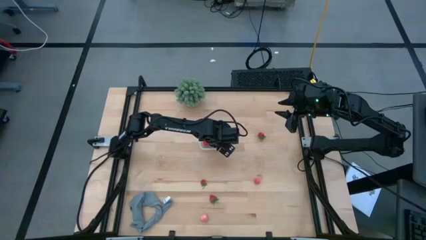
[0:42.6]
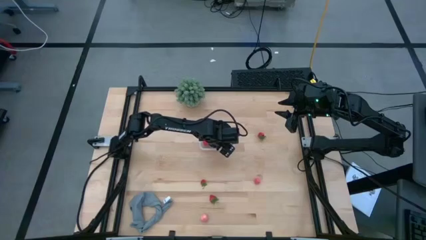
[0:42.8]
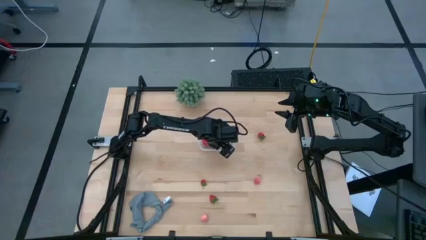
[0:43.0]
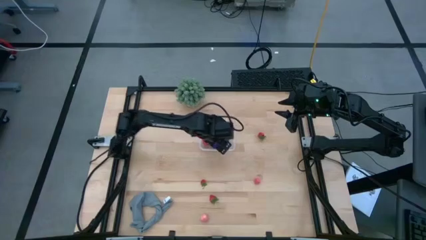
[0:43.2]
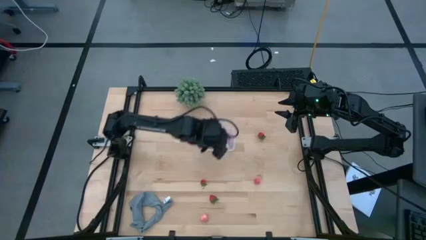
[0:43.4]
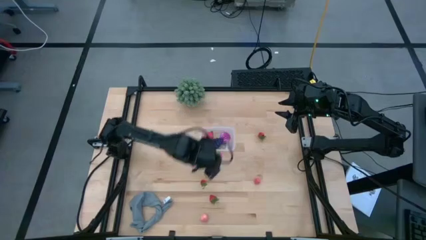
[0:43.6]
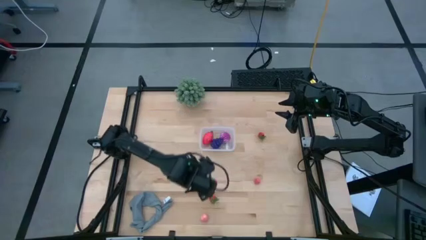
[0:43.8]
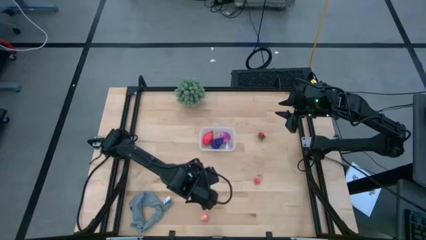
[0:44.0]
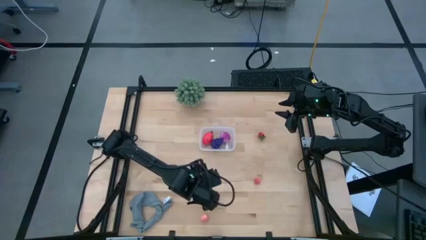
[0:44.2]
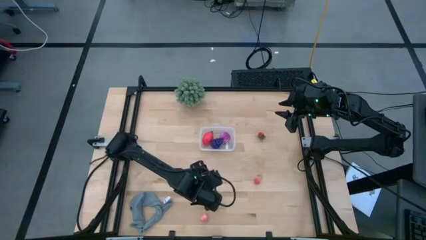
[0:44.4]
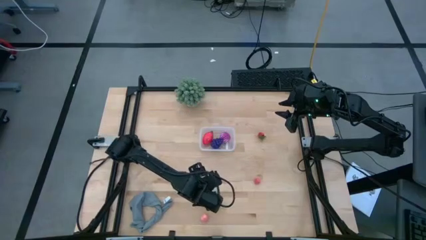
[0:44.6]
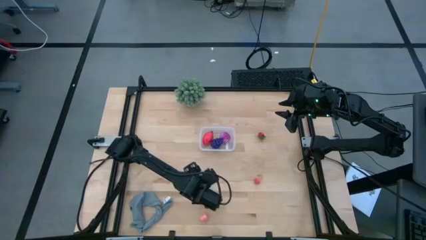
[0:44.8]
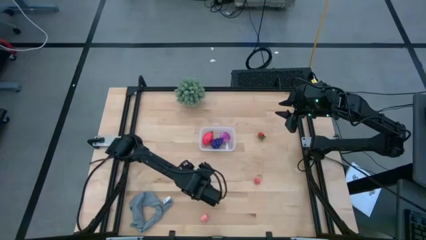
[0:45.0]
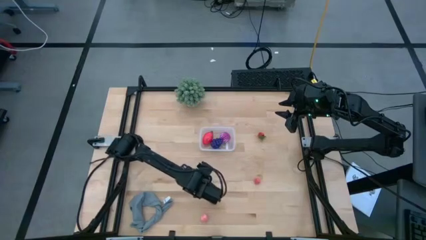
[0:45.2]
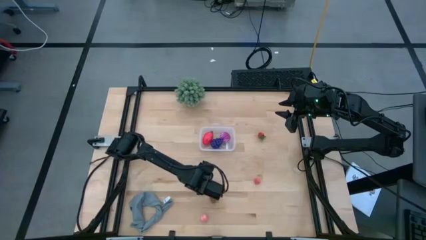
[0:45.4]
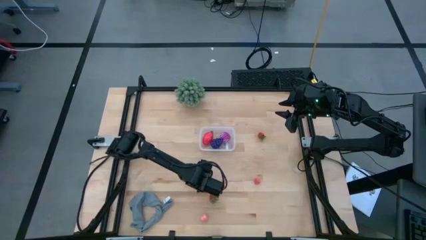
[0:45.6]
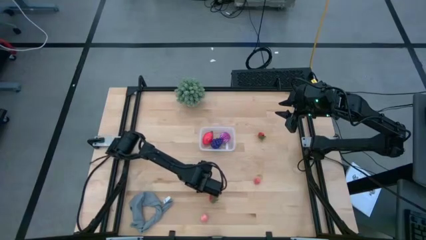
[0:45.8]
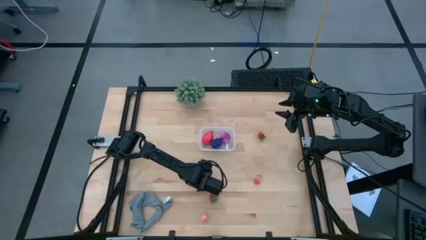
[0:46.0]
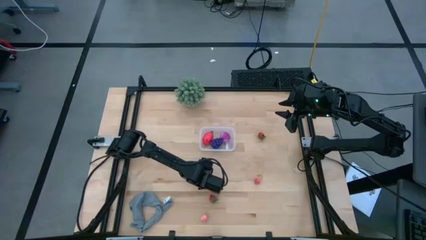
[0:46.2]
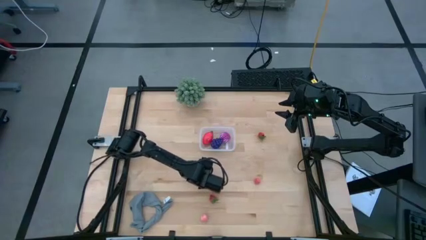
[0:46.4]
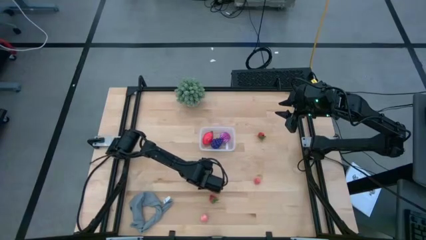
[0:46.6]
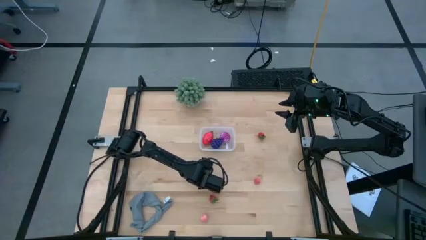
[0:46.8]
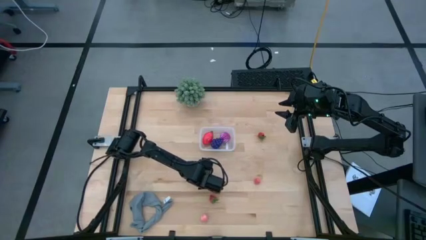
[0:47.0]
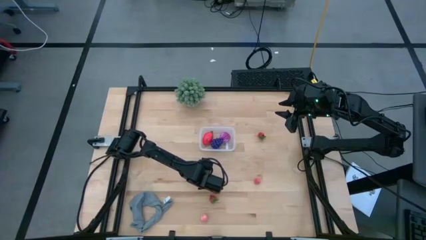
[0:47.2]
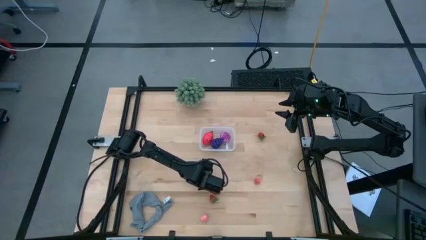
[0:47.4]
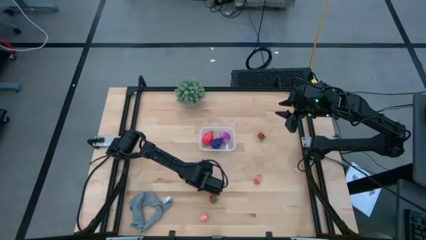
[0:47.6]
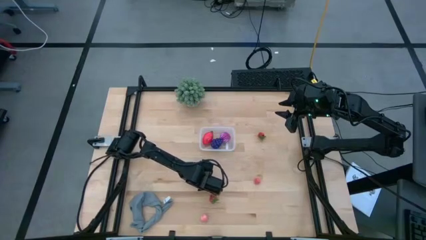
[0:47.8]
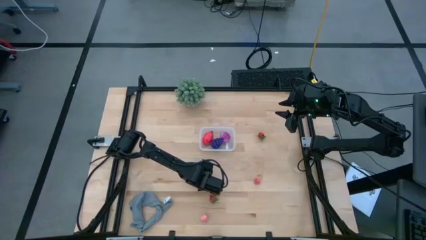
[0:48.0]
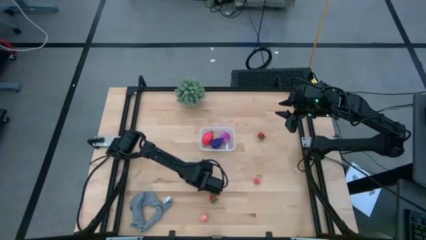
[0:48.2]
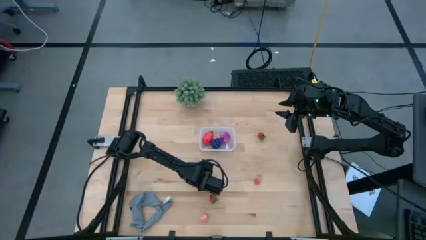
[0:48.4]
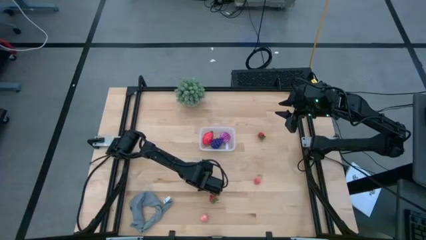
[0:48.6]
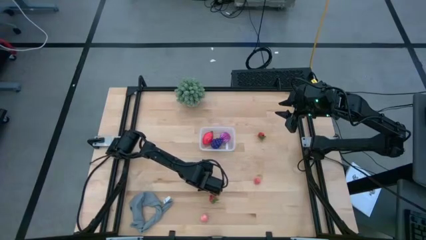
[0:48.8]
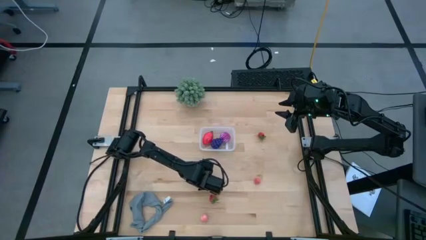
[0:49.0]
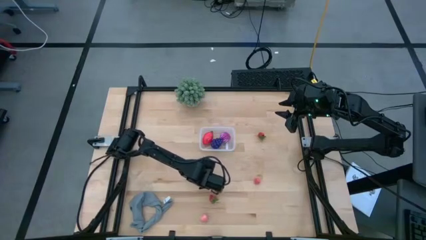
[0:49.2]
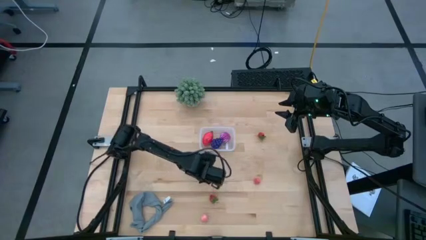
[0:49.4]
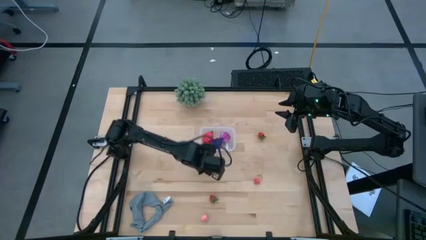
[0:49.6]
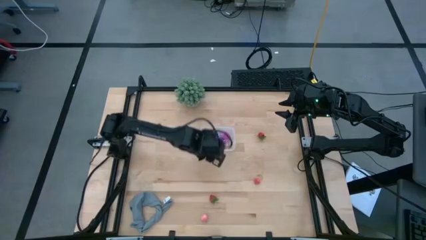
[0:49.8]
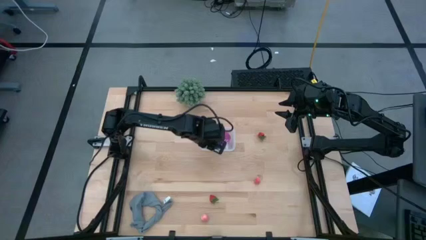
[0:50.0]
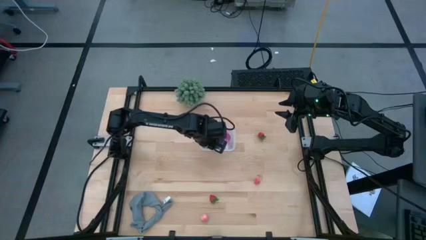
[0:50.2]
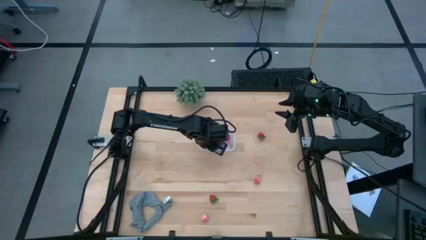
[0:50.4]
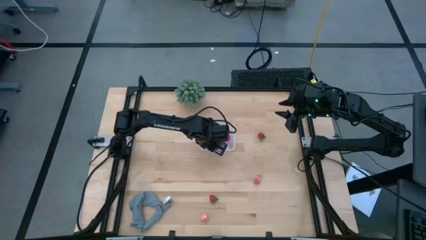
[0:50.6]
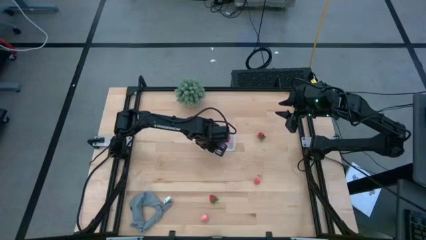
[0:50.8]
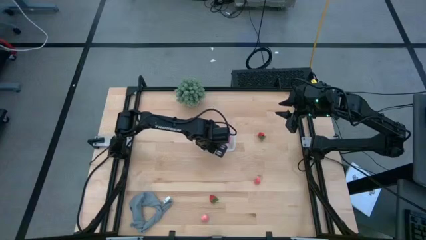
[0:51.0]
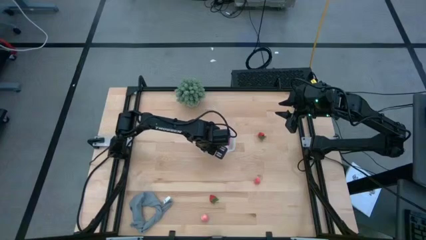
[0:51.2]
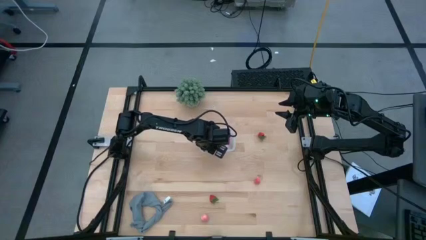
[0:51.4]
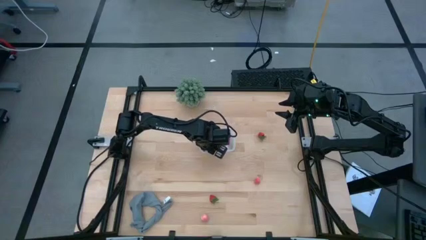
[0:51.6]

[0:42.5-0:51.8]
Task: Pick and placing Produce into tupperware
Put the top left strawberry into the bin

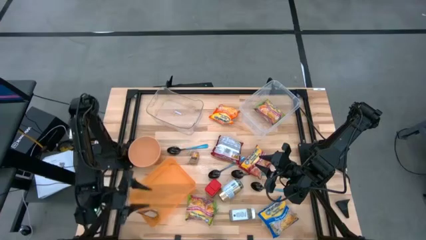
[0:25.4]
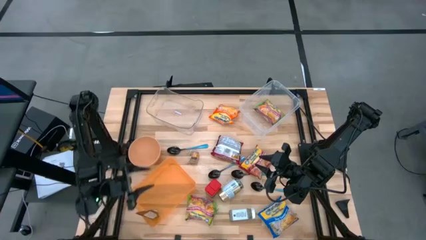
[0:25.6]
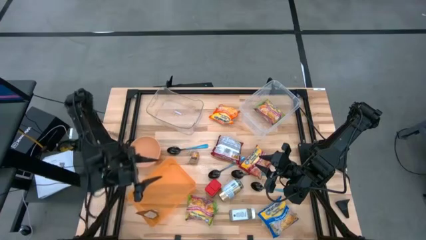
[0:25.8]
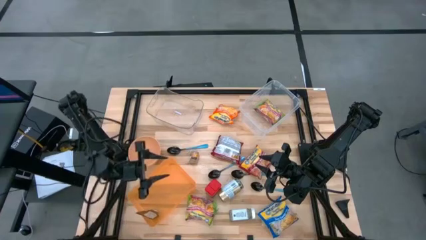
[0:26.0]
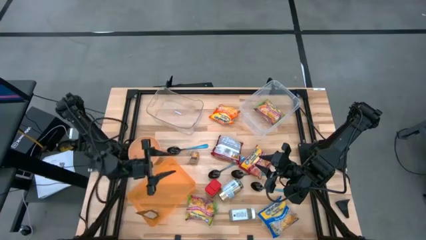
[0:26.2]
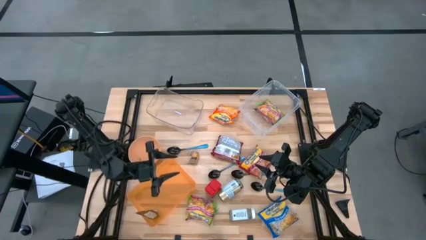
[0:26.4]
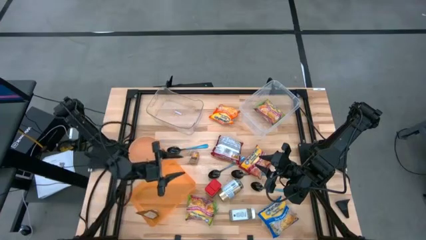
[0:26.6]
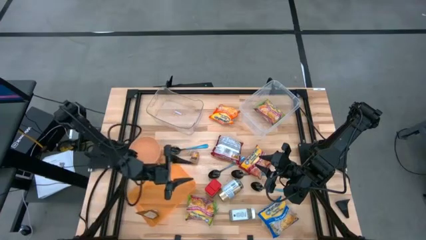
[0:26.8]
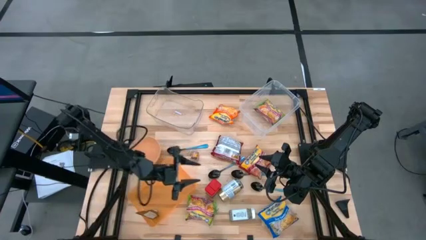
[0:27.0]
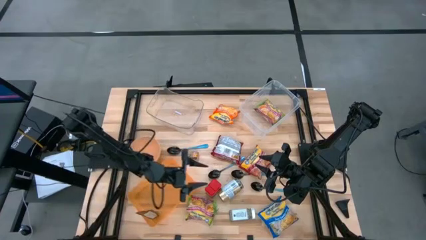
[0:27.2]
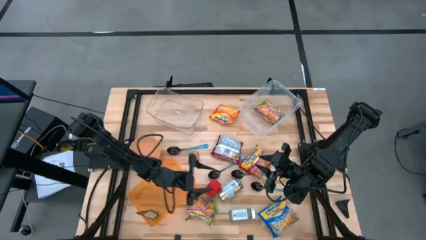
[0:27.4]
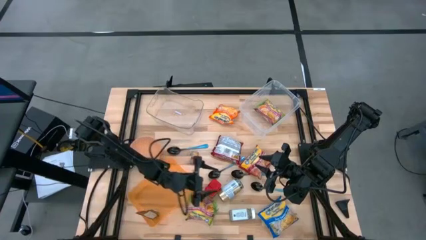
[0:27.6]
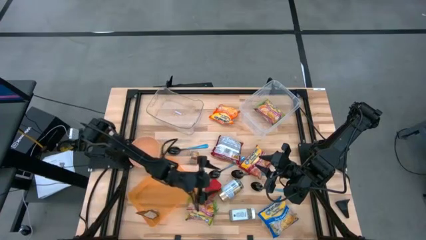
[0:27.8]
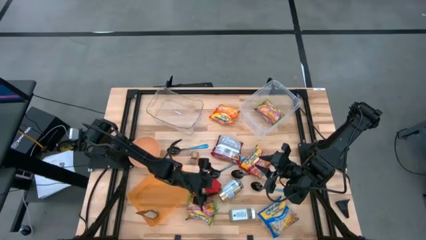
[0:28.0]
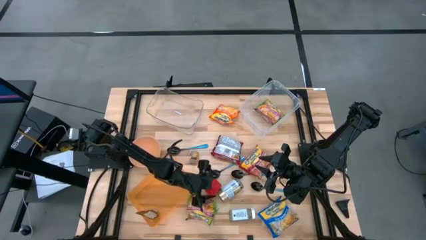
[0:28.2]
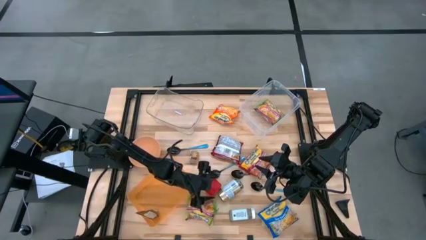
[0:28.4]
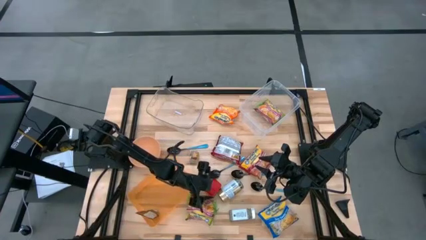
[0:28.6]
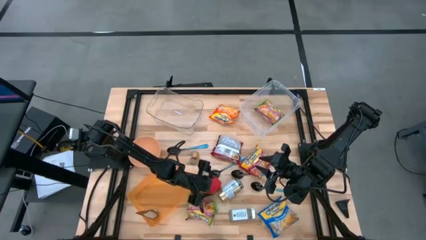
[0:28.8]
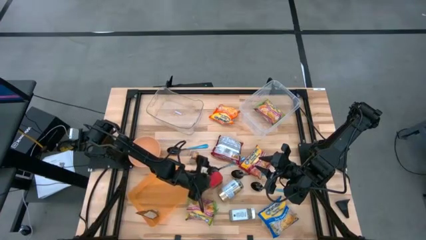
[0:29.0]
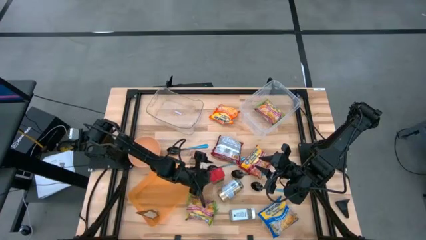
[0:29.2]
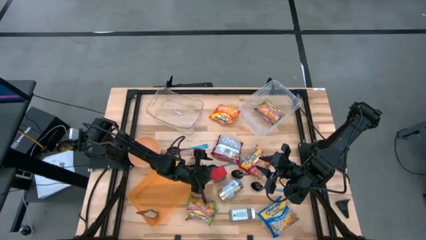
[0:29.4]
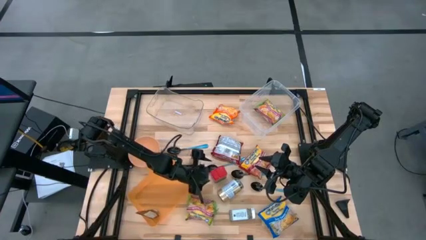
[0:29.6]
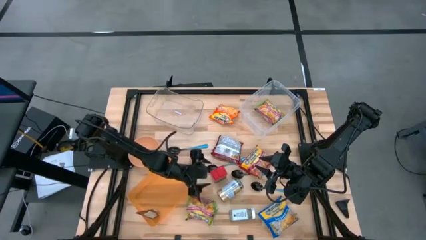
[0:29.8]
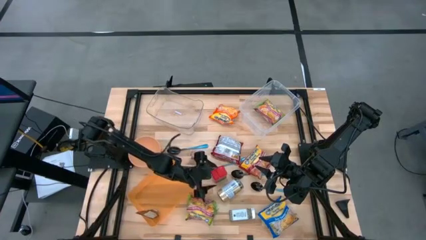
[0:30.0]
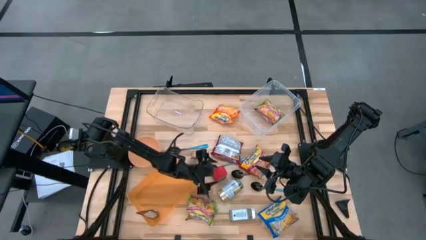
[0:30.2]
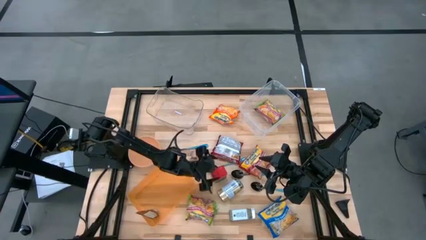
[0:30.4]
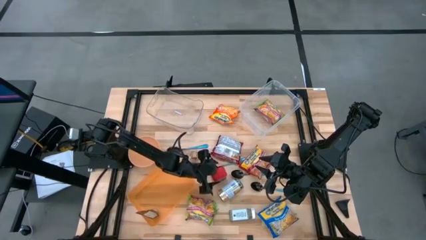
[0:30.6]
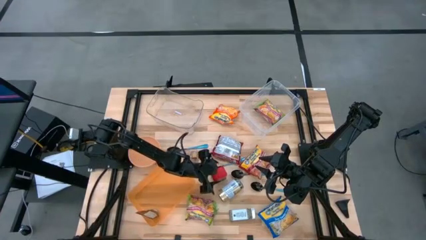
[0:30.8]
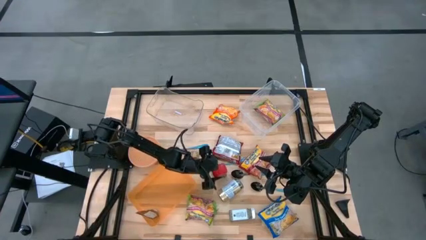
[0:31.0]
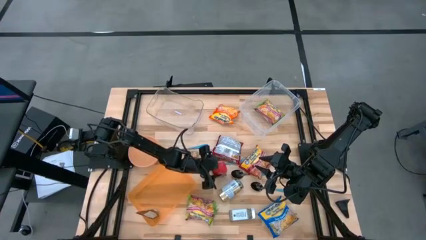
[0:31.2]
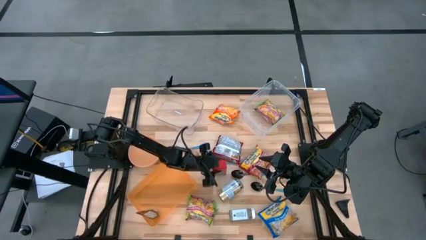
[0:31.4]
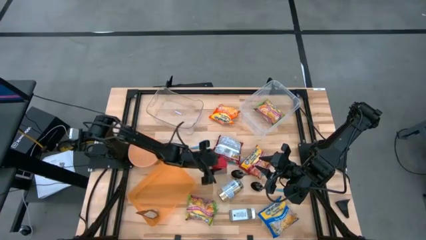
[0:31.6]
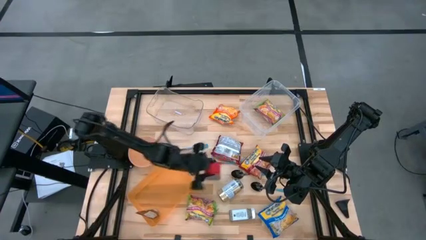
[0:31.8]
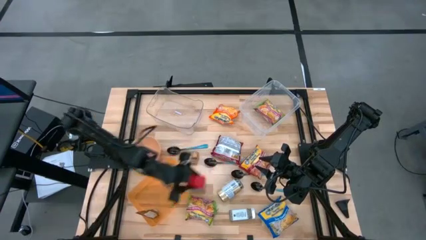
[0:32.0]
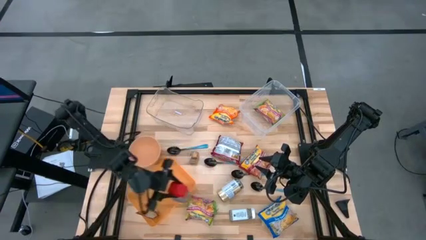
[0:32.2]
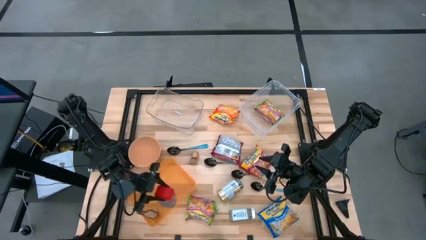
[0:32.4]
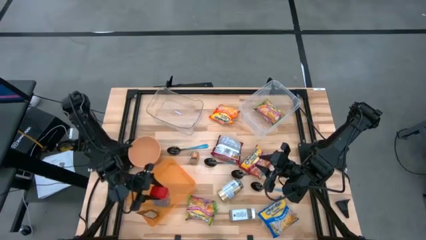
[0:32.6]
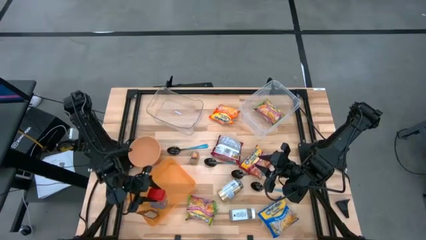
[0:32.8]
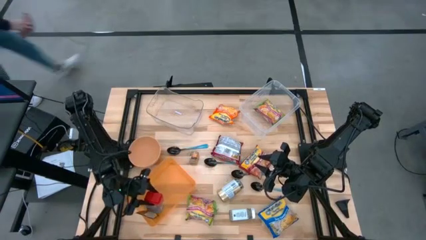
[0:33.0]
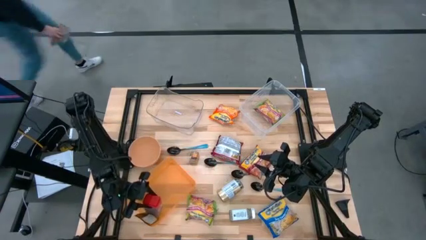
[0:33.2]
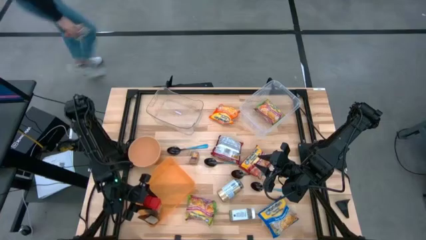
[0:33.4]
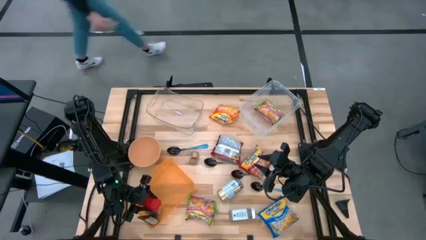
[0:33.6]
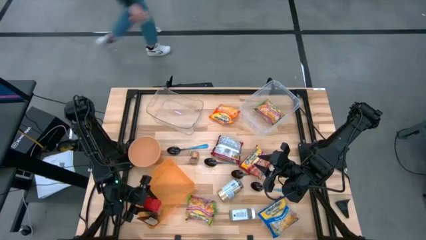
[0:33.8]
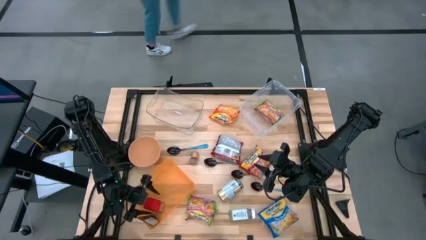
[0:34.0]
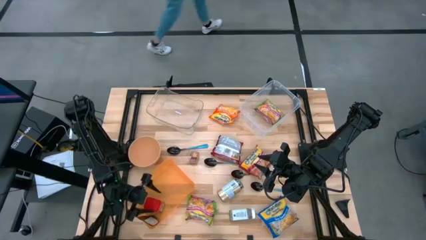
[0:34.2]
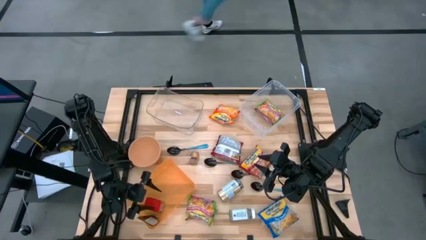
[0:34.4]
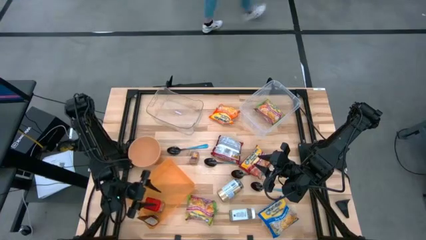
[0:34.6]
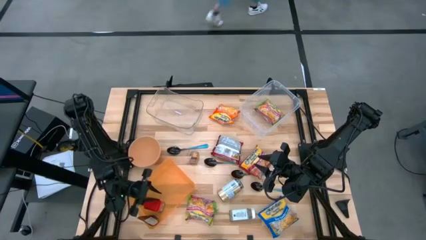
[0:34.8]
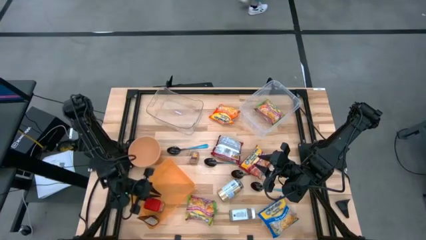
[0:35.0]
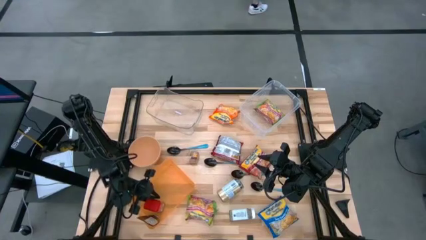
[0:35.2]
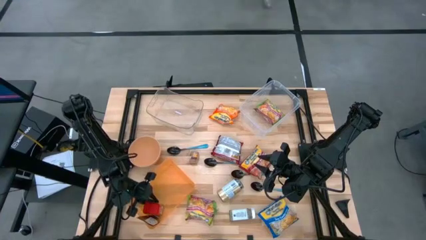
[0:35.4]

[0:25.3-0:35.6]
Task: Pick & Place Food Item
Put the red seasoning can into the orange bin
